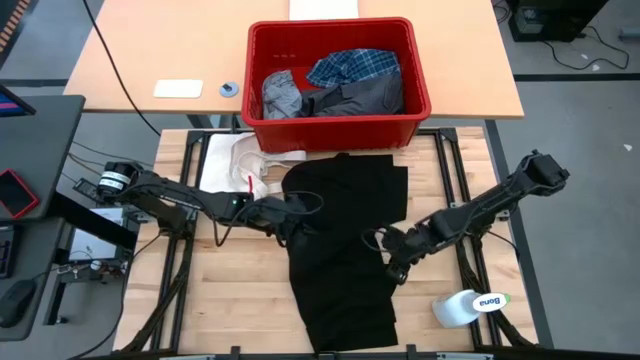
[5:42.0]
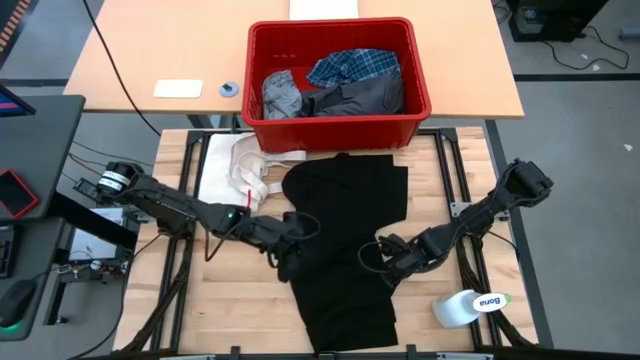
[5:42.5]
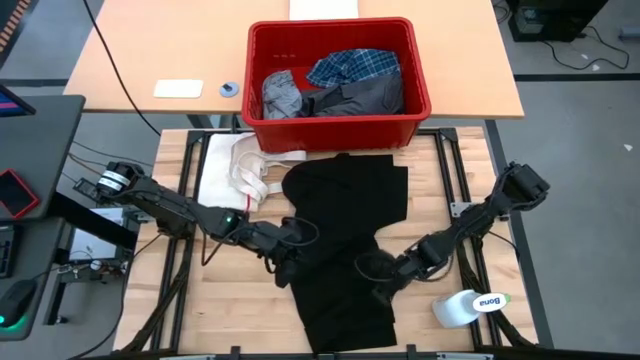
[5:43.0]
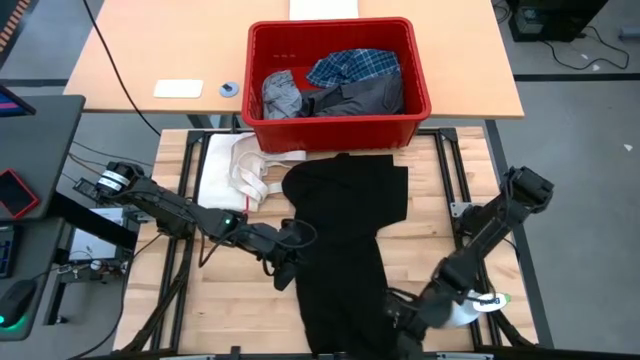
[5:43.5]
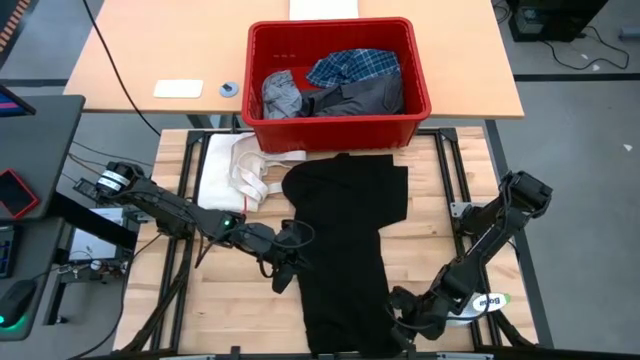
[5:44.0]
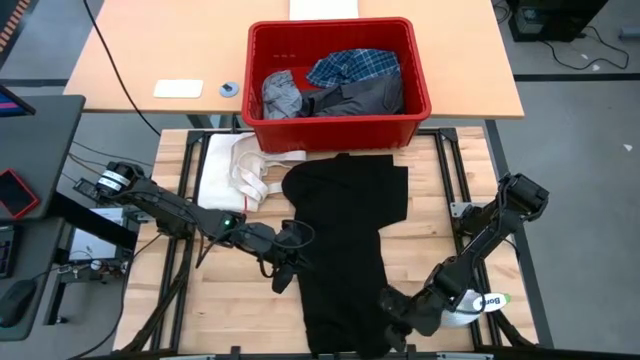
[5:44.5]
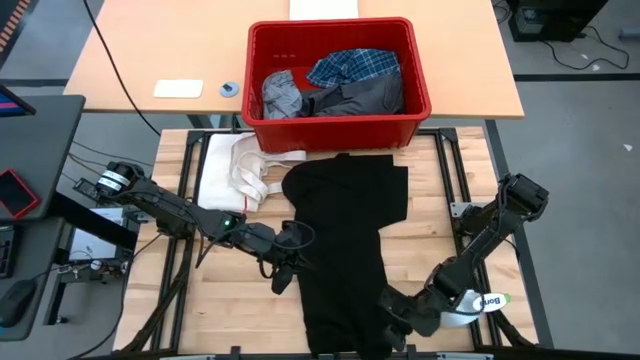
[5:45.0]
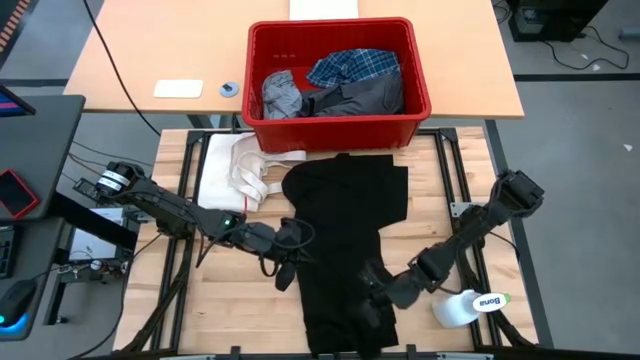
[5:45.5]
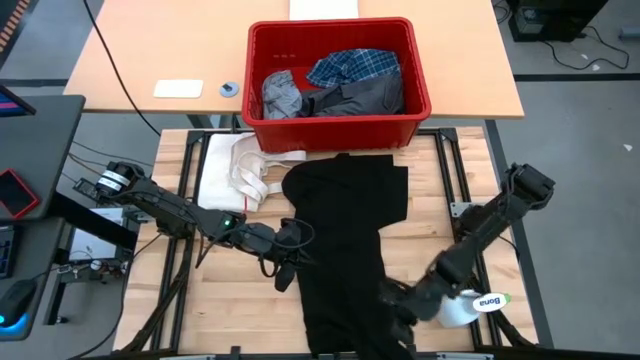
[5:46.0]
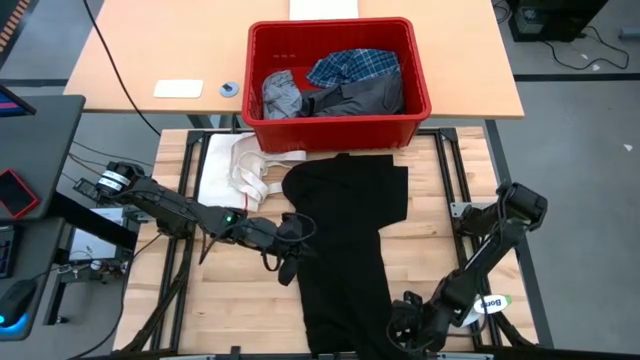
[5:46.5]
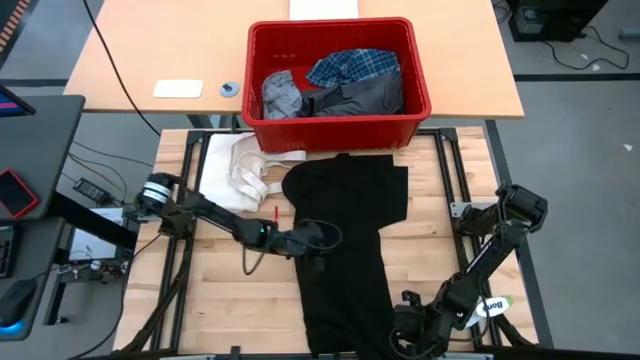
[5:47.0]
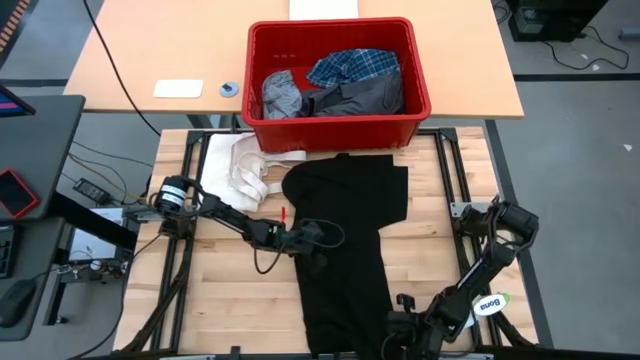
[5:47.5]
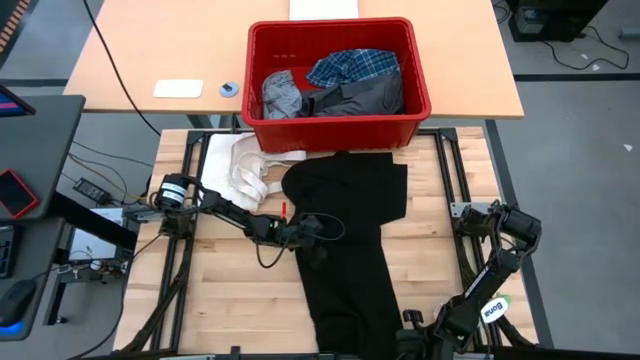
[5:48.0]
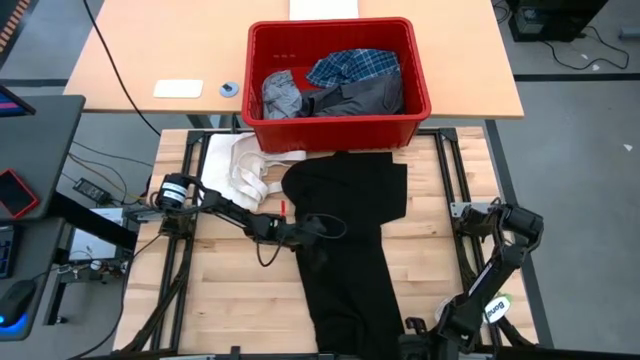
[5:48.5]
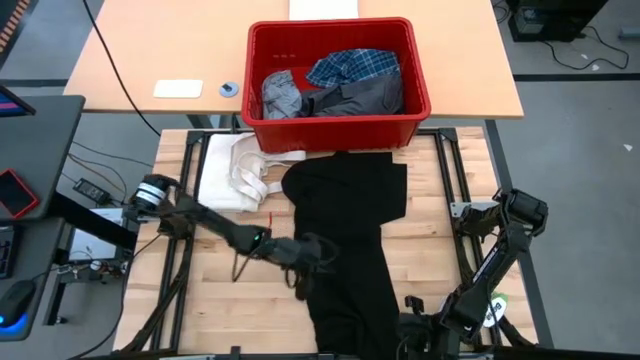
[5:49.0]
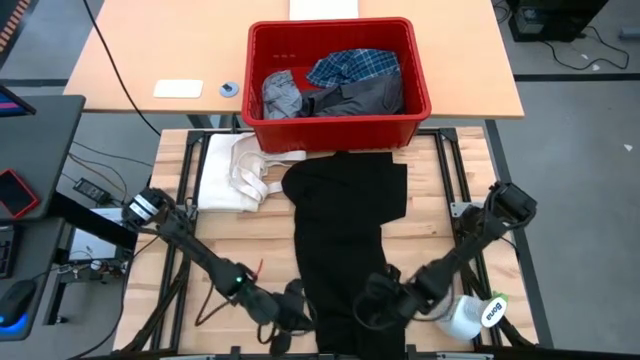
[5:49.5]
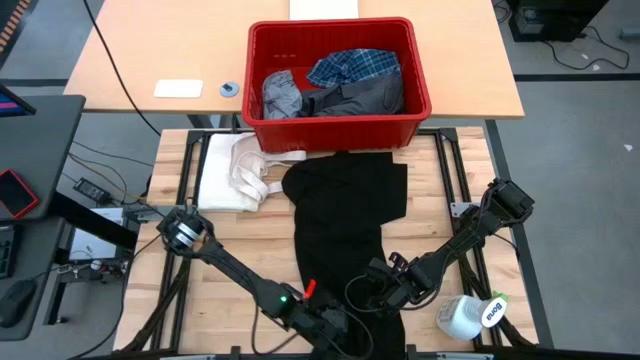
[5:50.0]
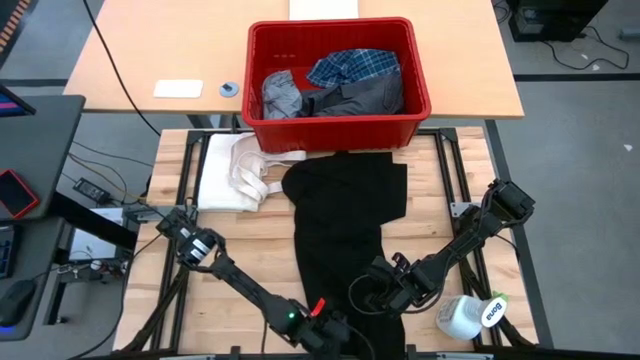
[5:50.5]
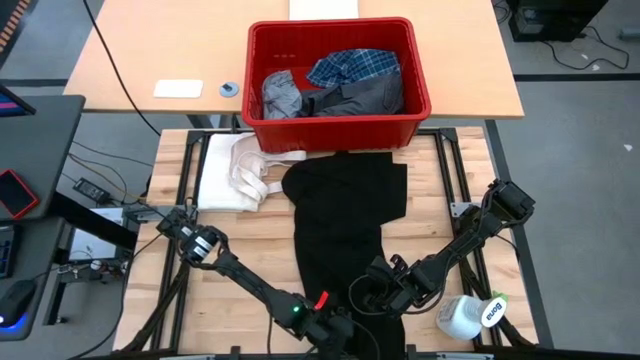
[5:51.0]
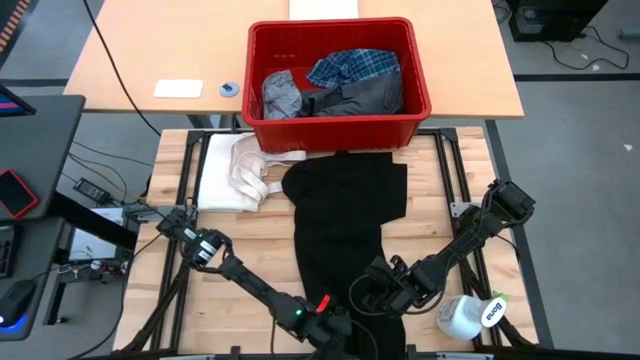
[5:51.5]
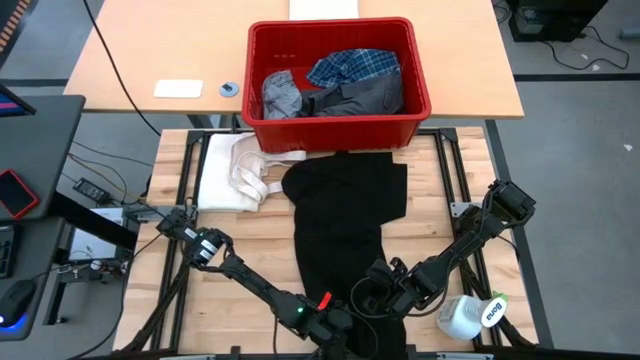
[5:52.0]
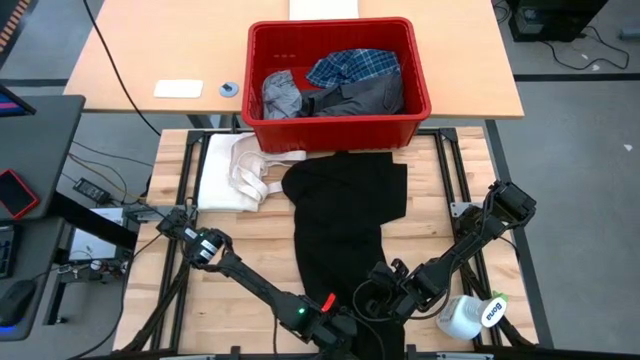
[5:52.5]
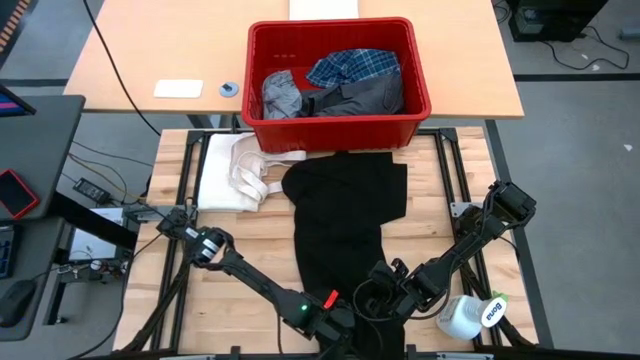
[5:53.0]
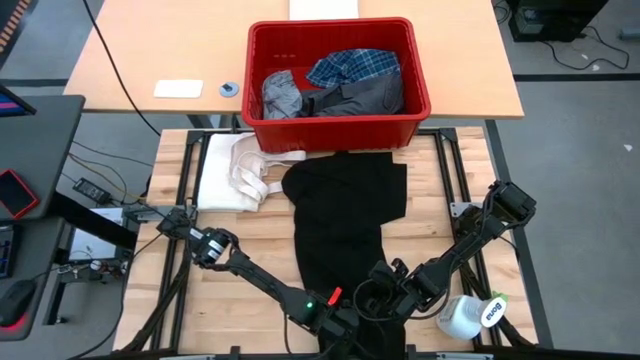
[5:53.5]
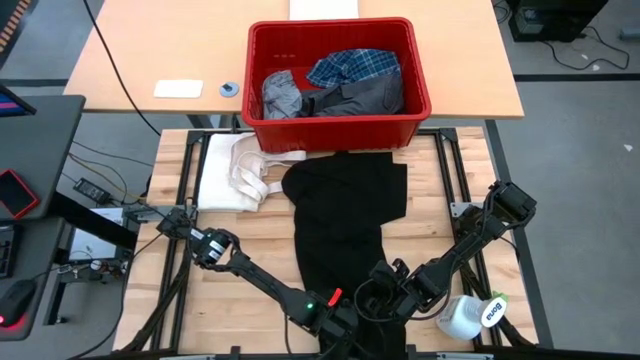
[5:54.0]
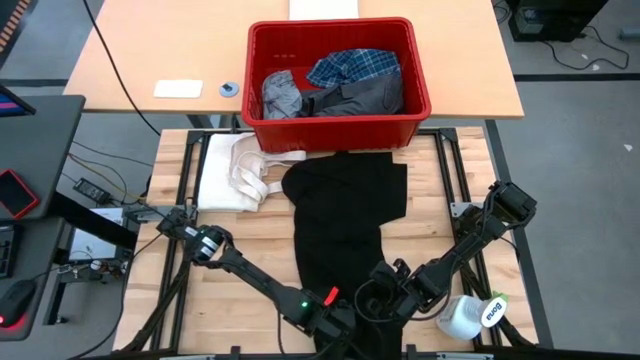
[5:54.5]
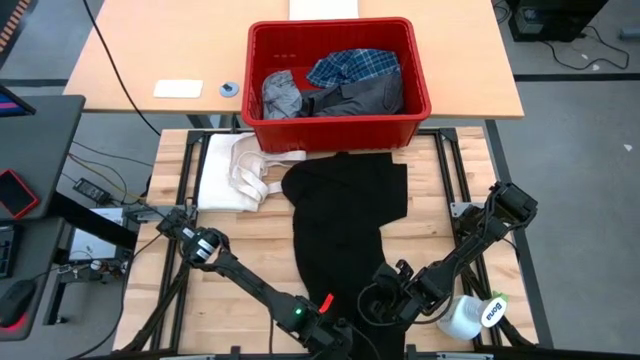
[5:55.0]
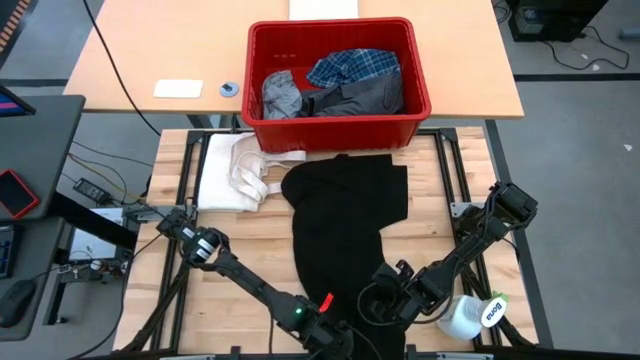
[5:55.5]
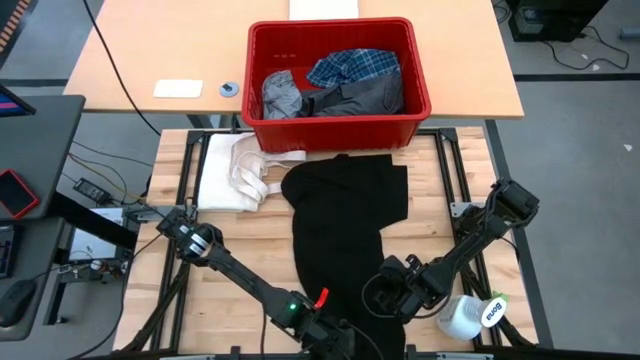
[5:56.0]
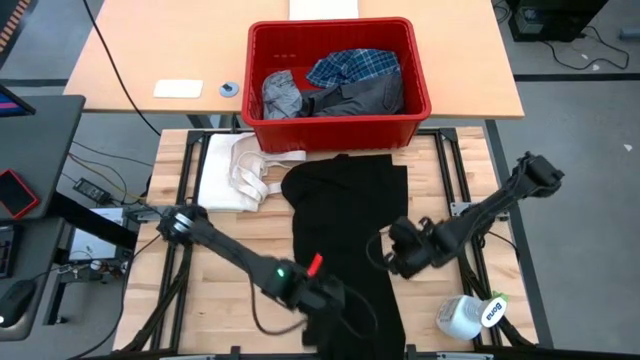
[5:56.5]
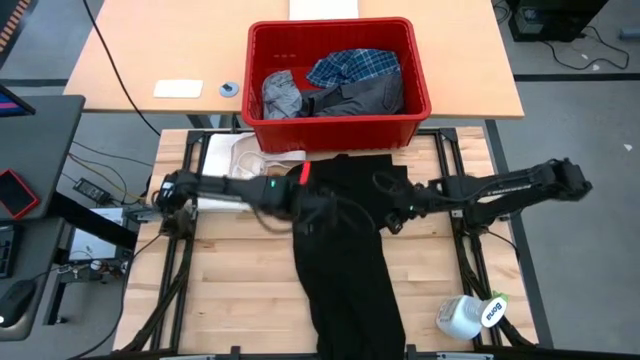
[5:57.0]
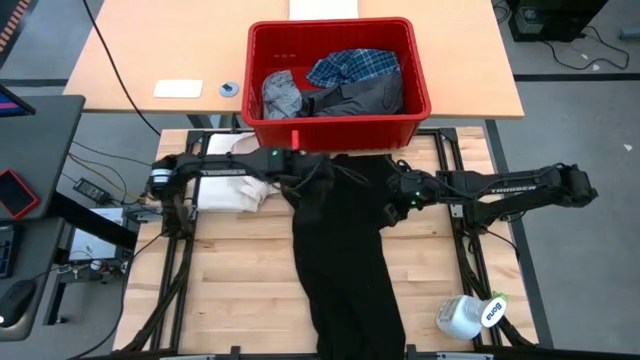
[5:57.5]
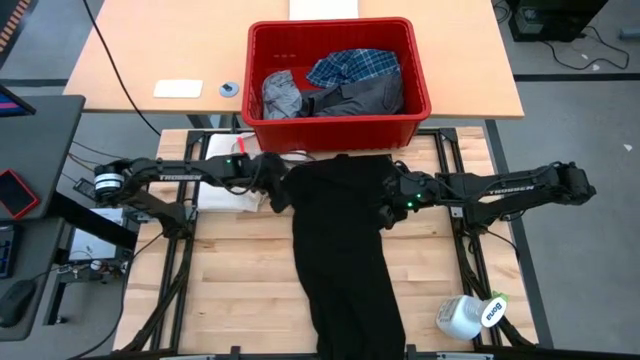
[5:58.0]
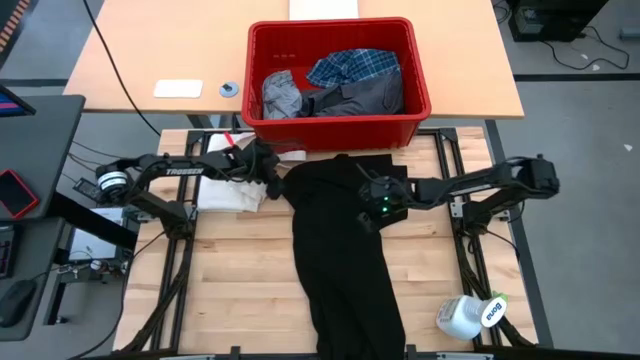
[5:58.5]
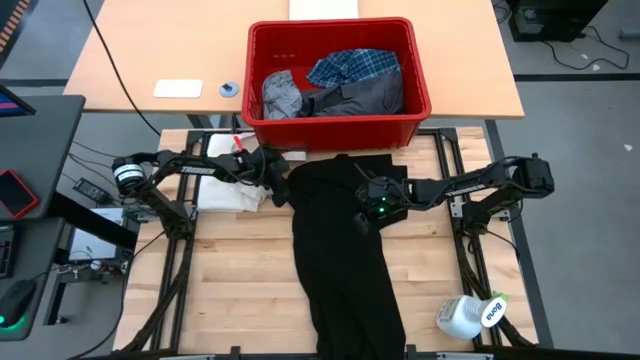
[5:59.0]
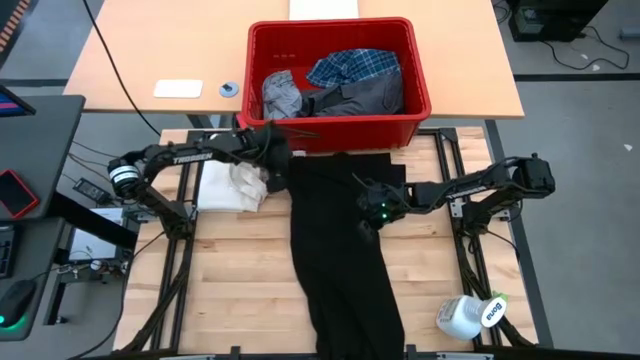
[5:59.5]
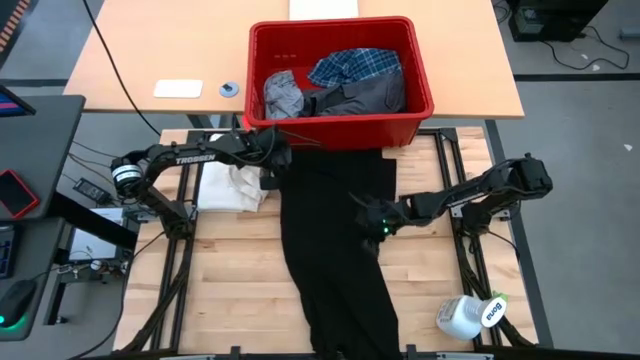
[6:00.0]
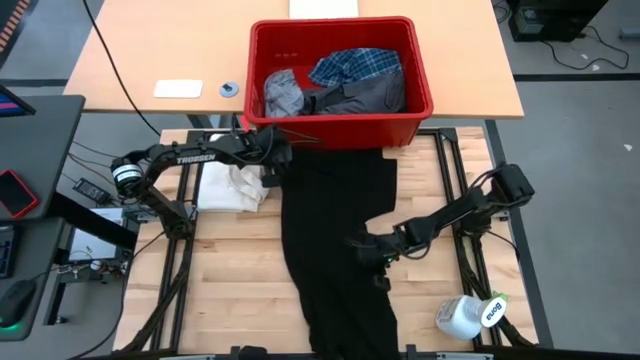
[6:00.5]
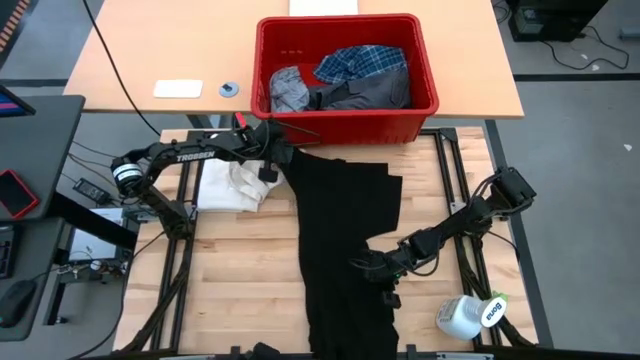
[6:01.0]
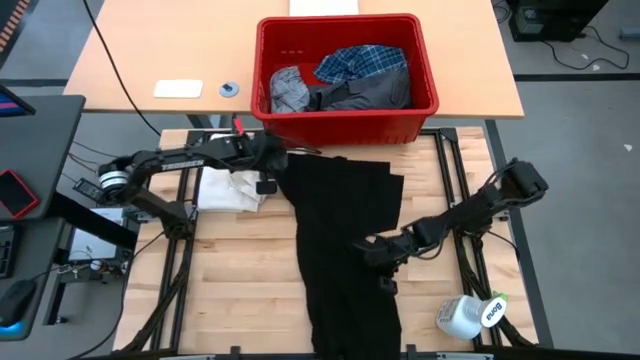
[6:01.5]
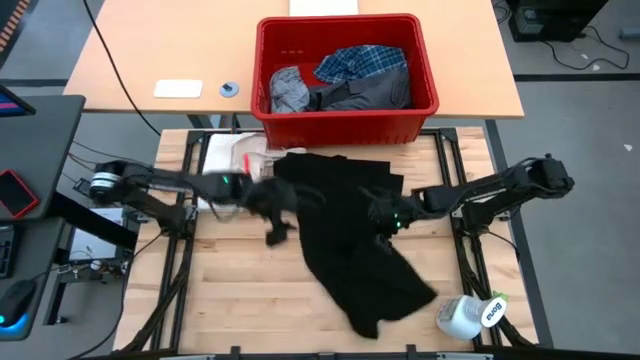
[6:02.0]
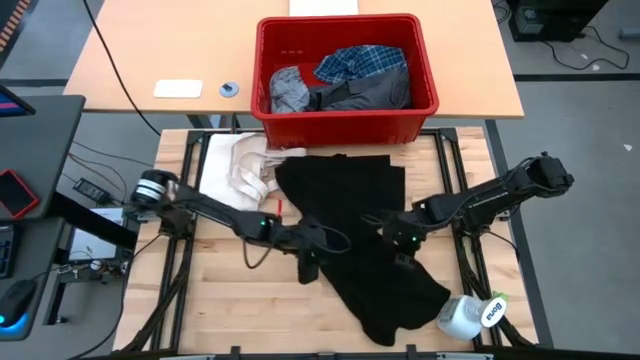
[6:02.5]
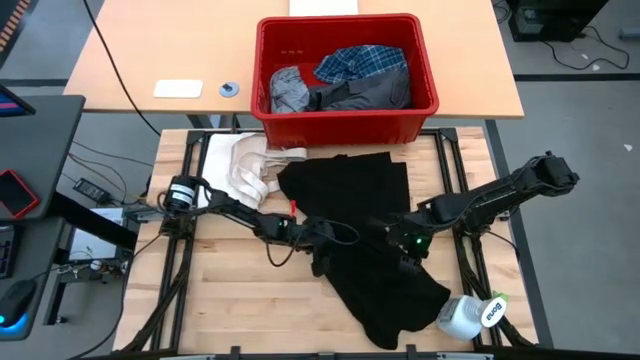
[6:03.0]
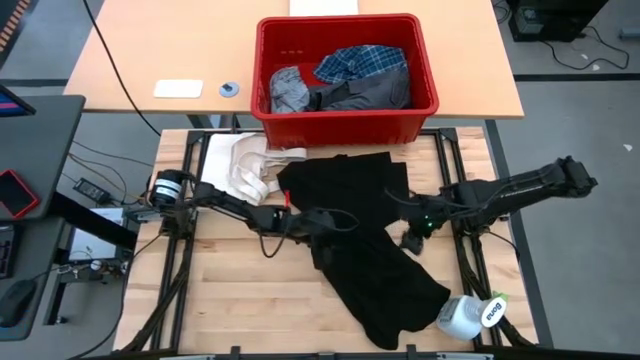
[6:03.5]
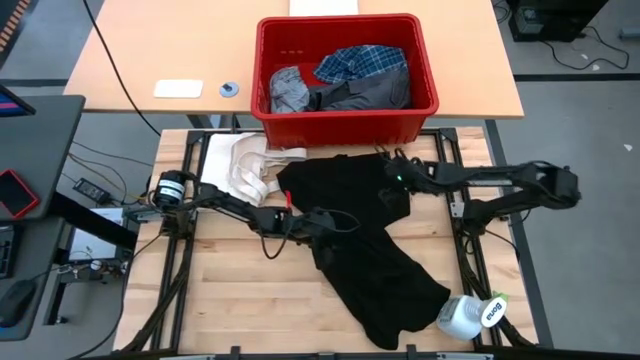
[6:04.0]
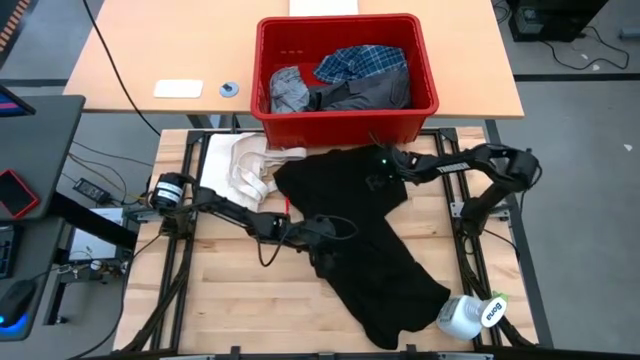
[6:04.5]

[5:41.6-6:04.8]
Task: Fold Laundry from Bin
Fold the black shirt
